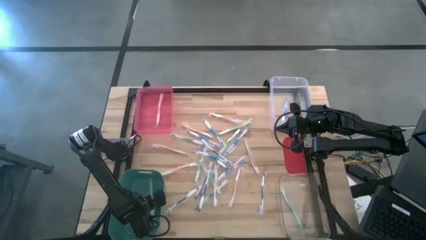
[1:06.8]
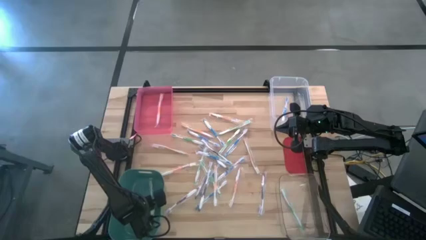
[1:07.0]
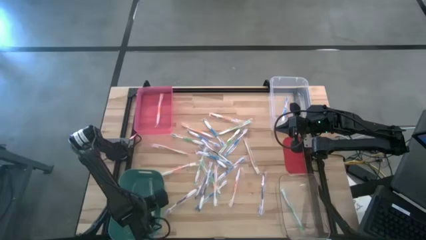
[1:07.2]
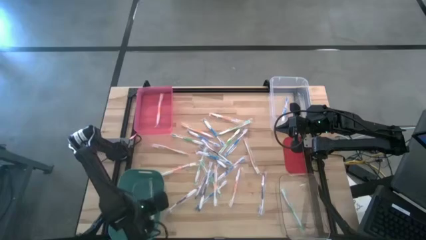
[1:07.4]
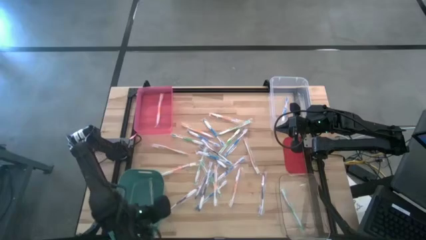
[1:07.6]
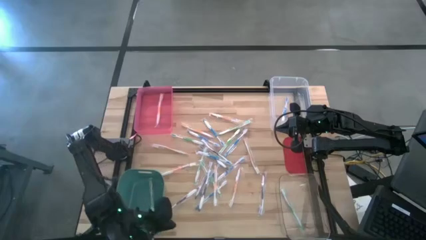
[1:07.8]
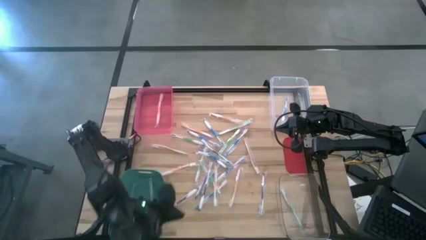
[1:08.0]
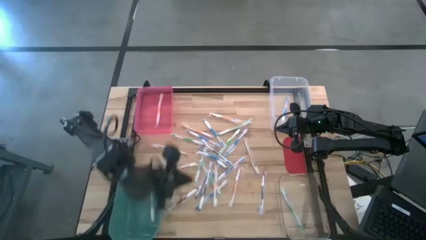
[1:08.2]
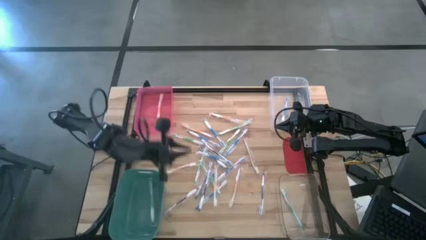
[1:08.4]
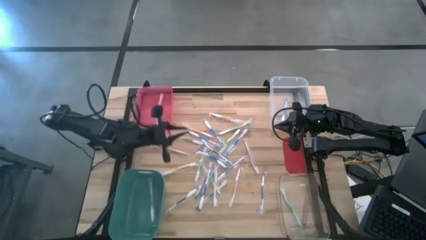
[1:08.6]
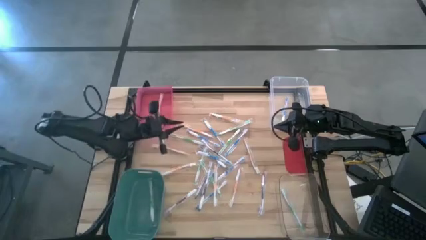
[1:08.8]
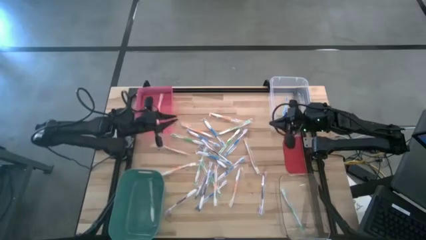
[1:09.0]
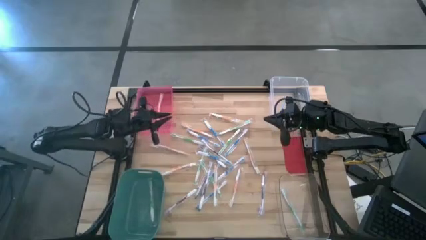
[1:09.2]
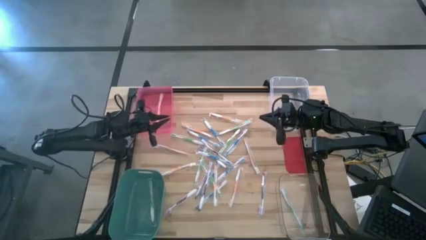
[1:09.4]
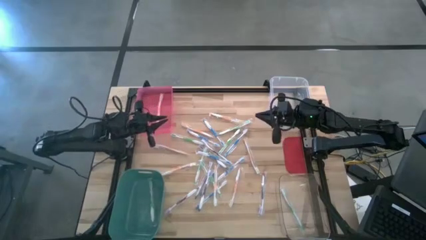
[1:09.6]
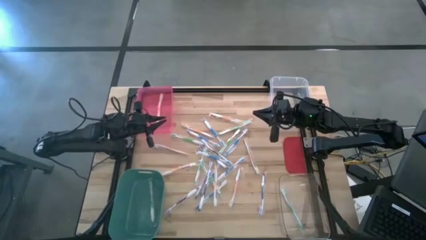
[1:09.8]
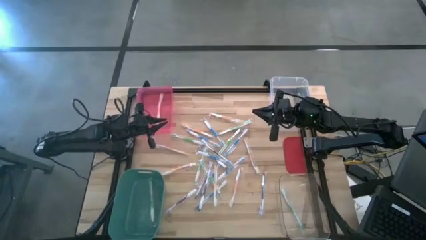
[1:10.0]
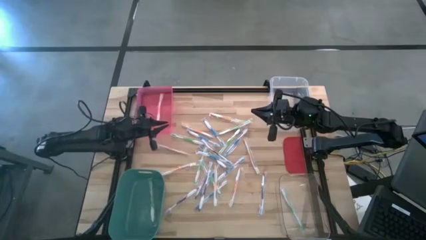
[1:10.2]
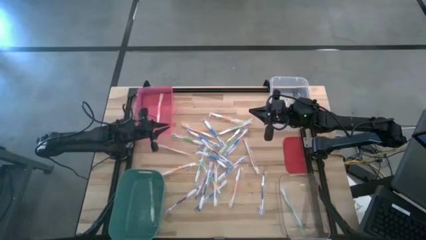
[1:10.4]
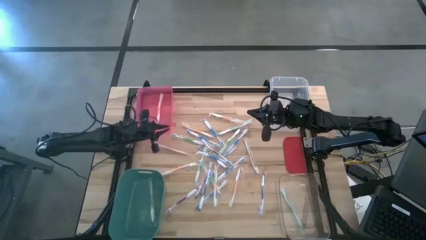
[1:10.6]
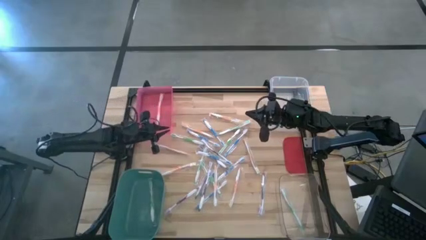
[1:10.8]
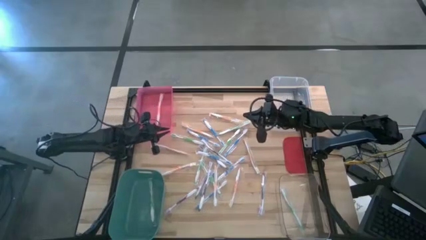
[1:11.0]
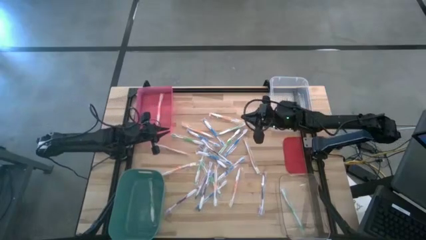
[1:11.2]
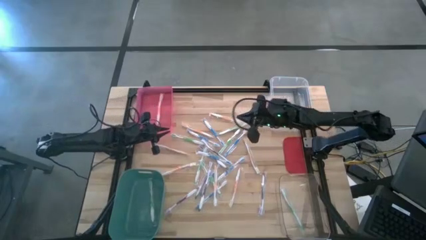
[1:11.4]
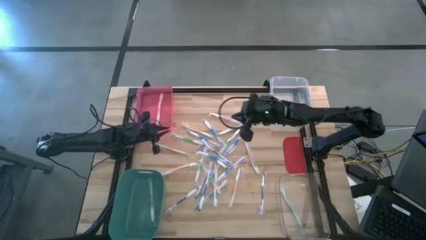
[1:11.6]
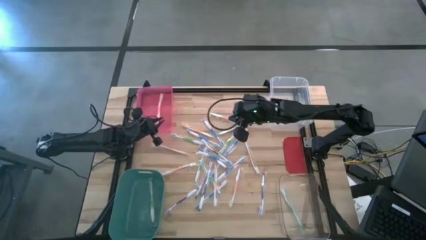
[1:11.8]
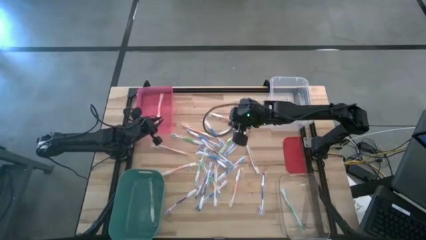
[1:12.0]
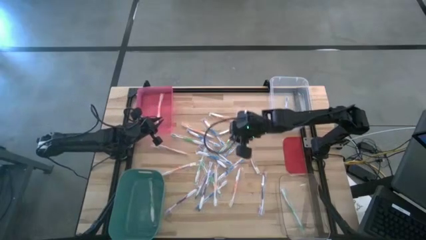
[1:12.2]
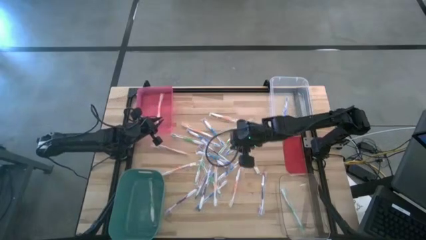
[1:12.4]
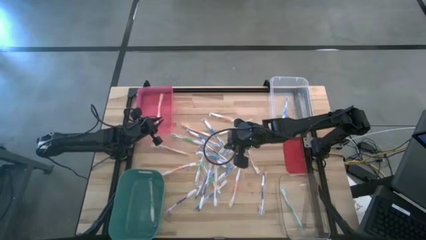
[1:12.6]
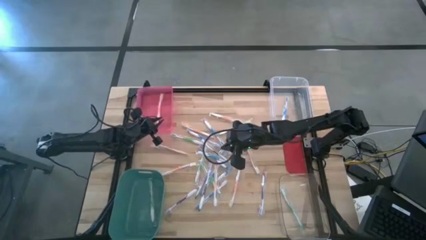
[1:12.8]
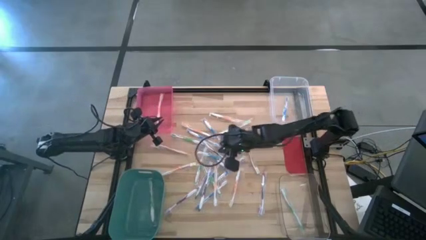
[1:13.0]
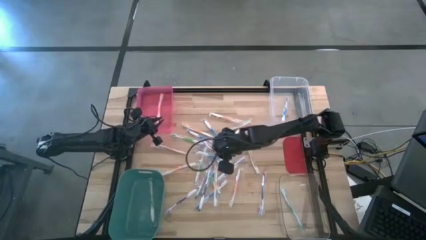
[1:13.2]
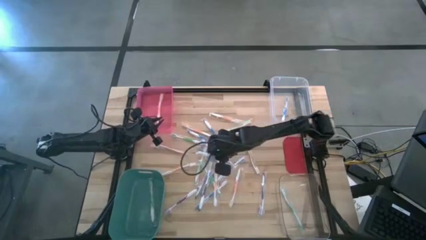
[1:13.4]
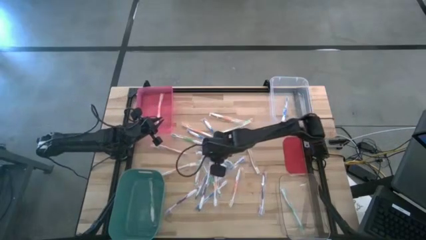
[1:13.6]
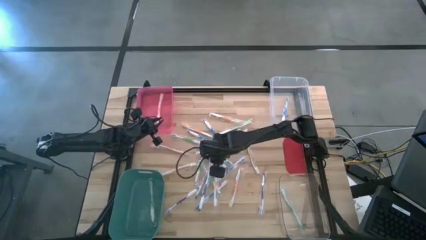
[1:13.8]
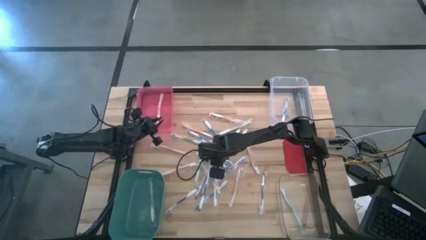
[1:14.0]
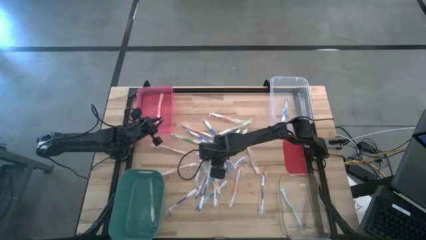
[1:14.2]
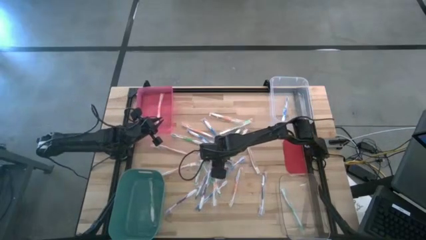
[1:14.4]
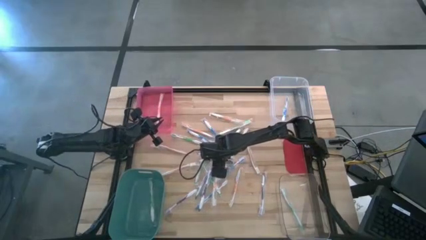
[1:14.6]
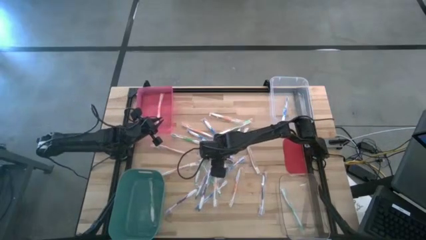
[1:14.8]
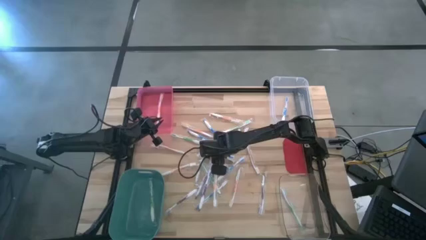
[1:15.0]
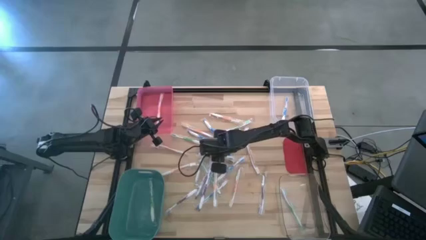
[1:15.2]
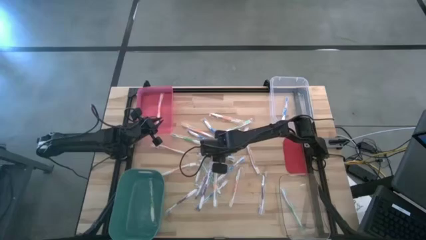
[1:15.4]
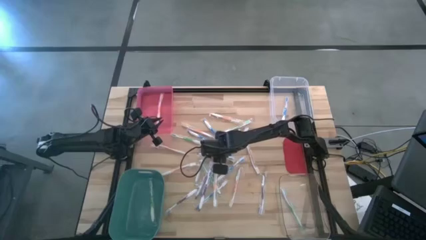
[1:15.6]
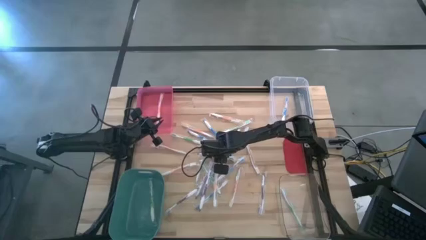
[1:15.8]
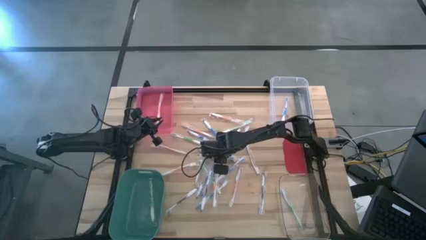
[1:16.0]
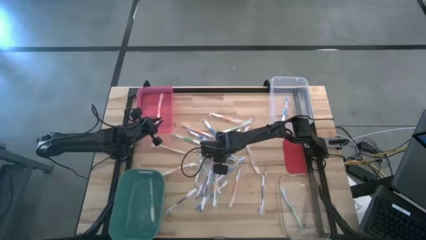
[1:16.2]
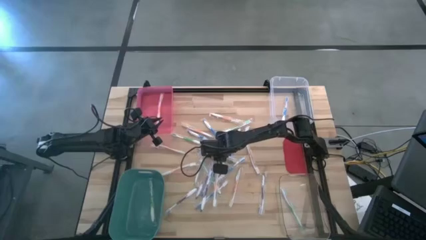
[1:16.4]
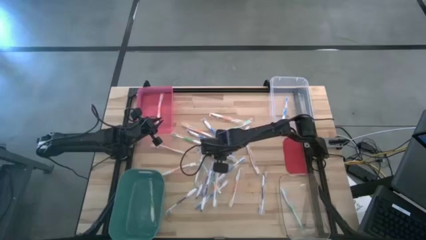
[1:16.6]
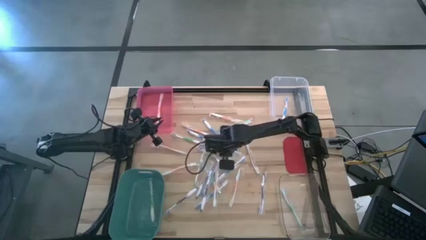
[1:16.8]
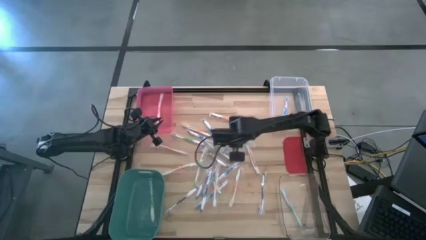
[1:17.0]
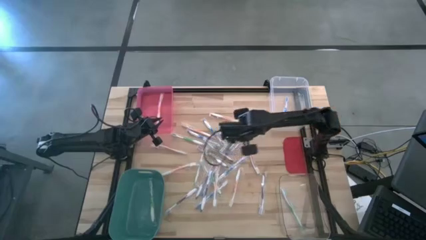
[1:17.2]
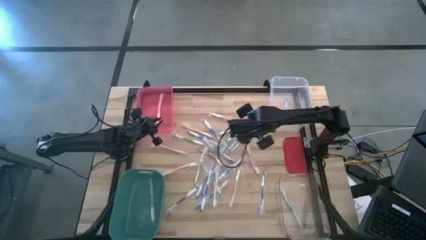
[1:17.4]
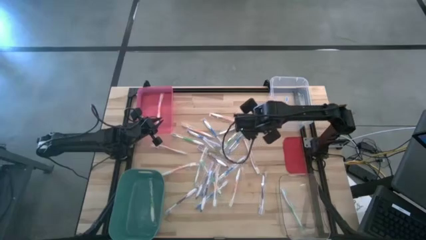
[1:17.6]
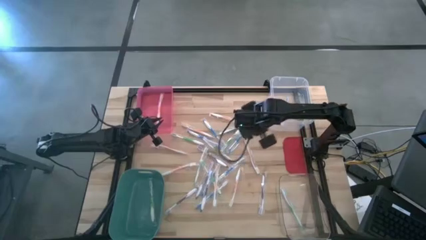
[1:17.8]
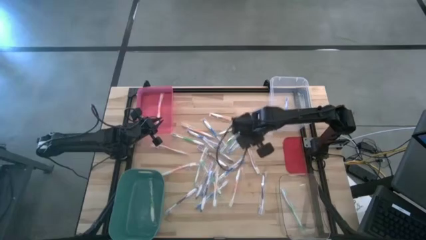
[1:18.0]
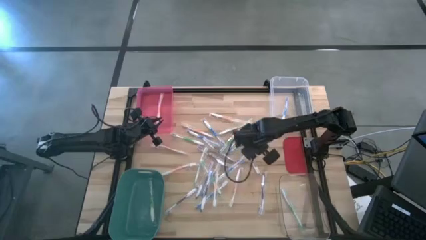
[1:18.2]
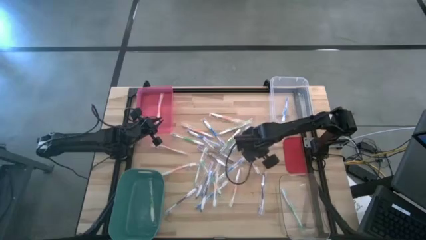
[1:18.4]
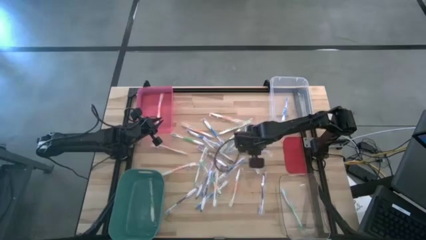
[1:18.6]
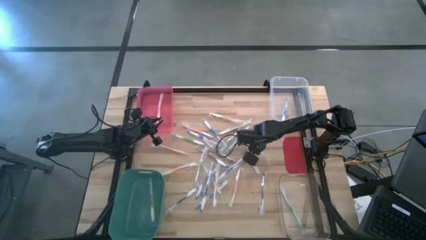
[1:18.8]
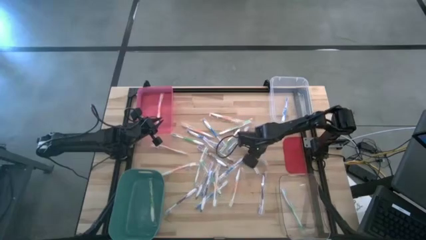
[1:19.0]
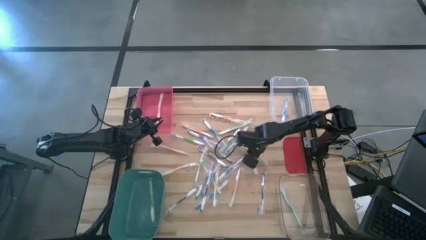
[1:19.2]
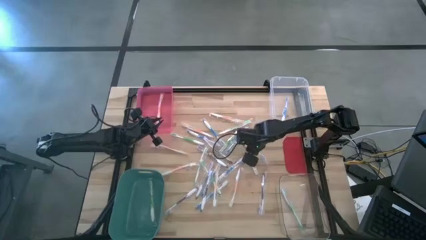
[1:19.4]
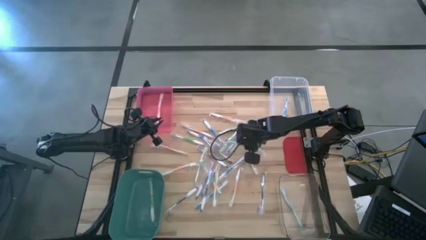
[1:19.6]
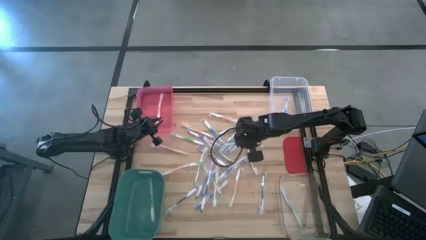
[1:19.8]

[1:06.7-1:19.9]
Task: Pick & Place Toothbrushes
Put the blue toothbrush into the top transparent bin
